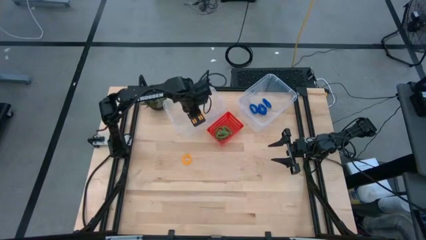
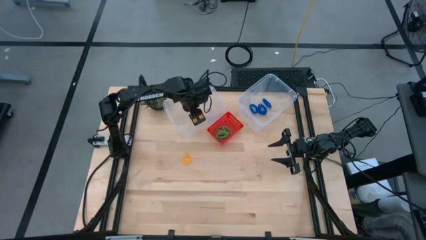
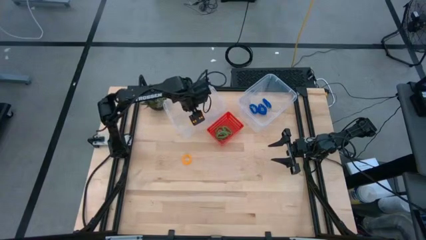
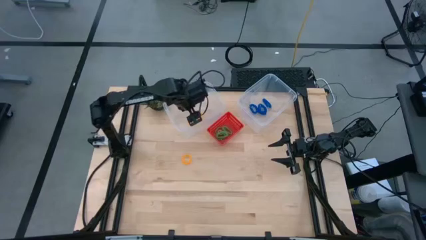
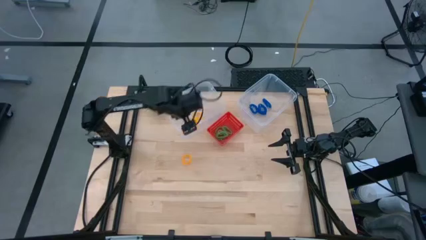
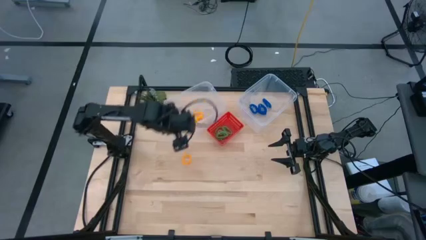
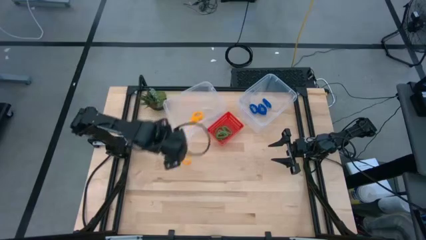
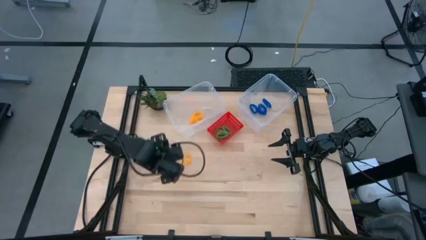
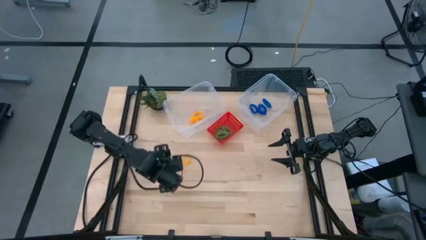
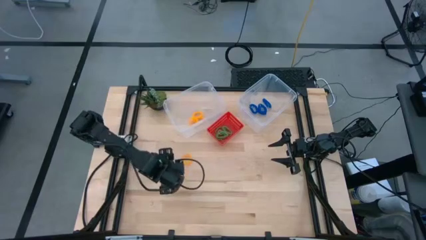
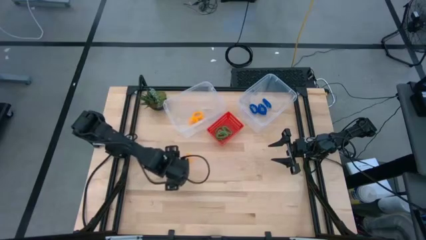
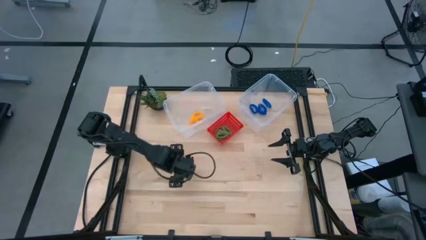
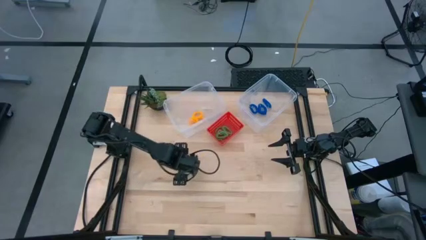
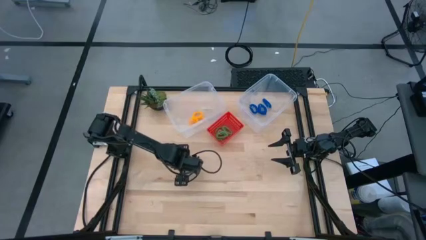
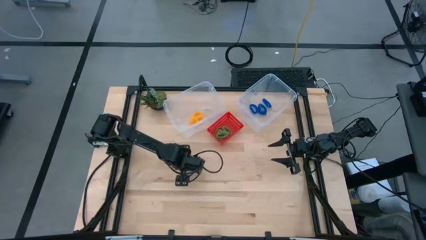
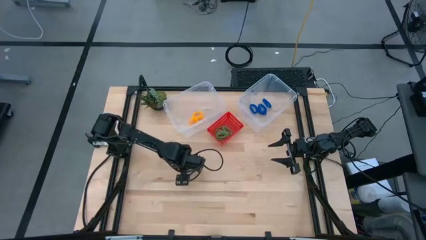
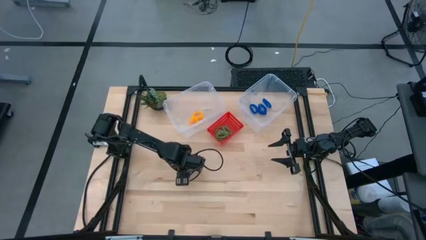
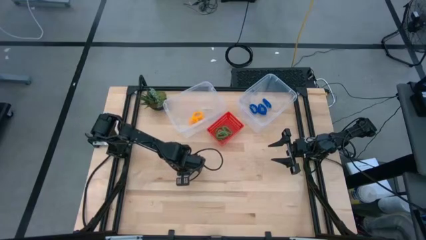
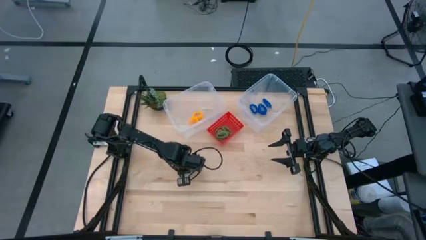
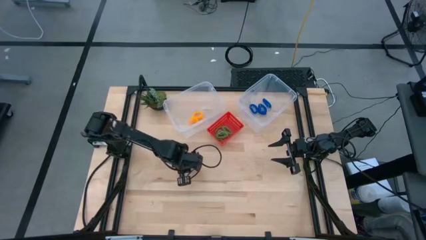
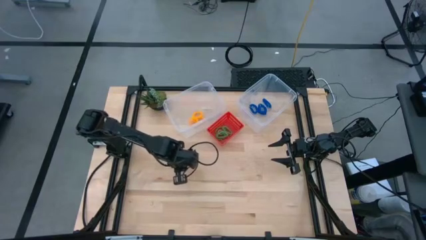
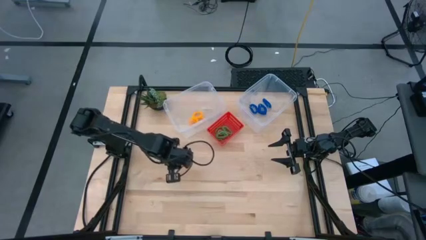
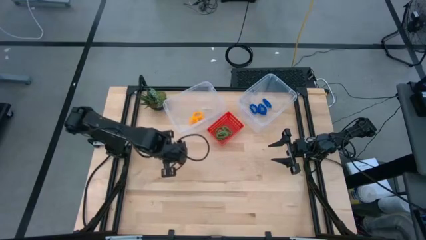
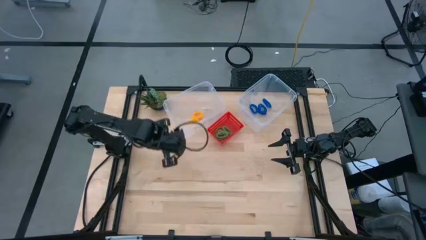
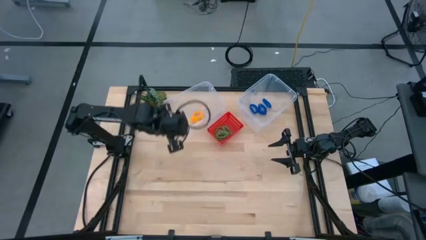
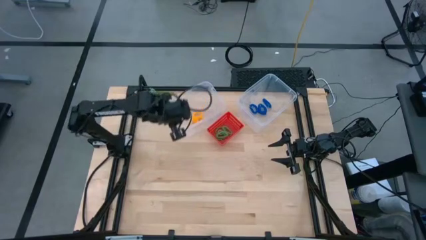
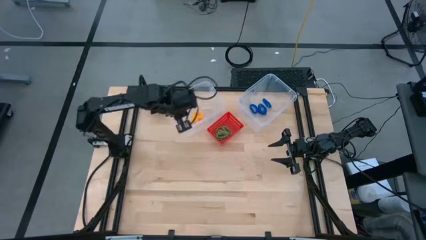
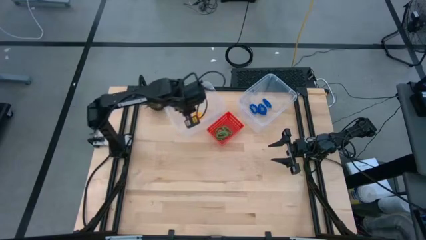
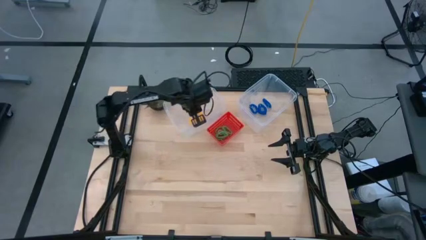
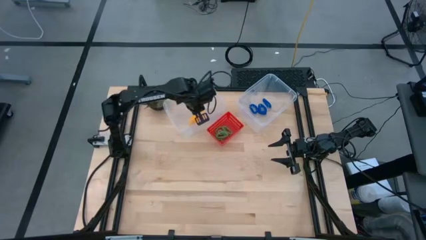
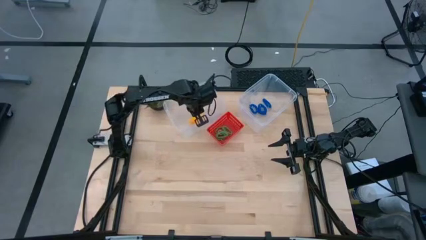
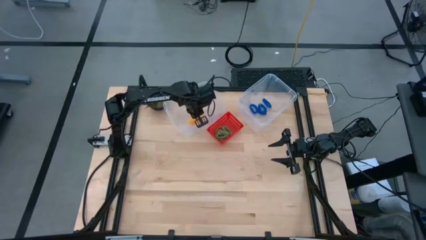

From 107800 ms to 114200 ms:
Task: Sort spring keychains
Put the yellow spring keychain into the left transparent bin

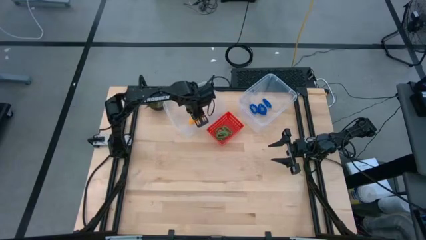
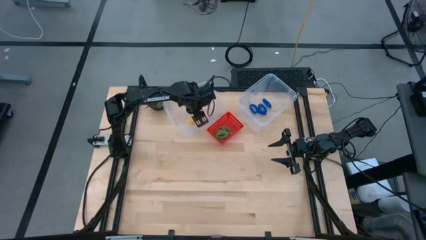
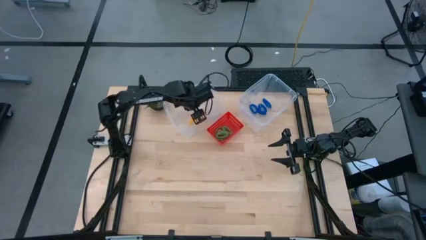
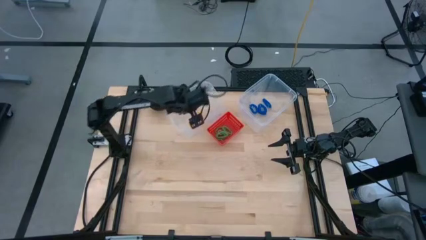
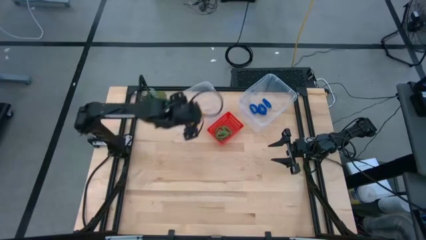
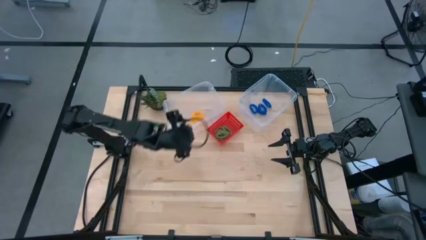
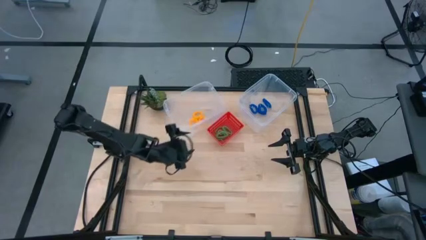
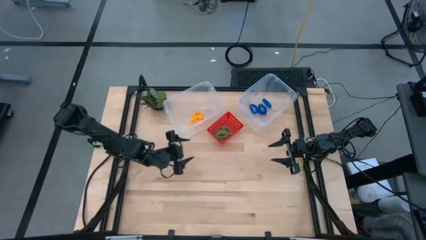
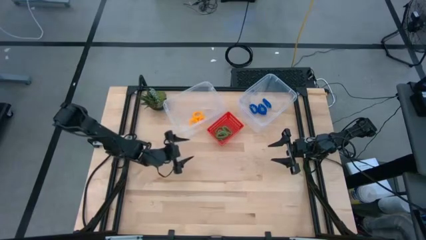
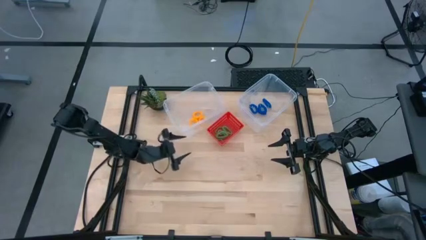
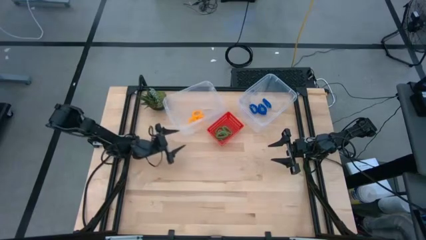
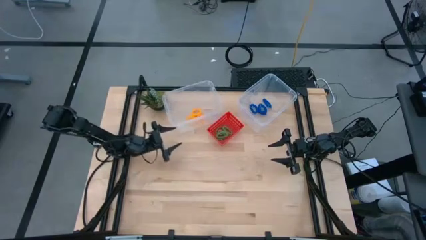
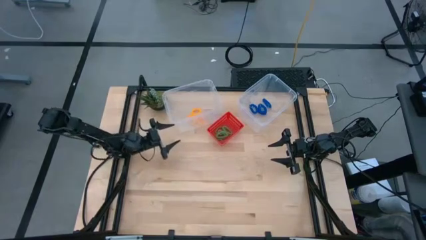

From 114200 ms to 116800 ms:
Adjust the left transparent bin

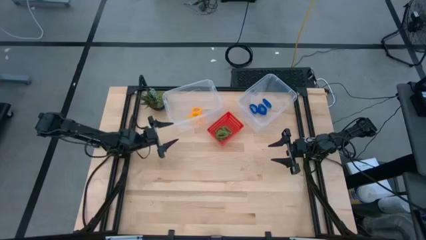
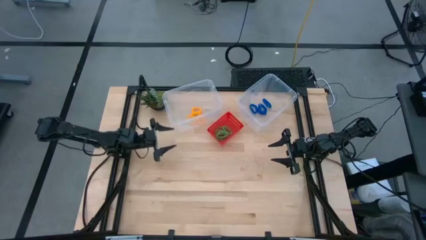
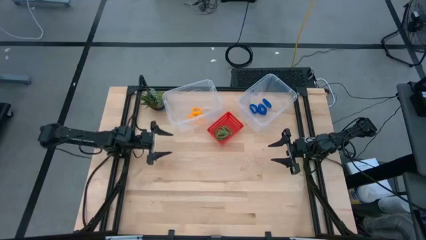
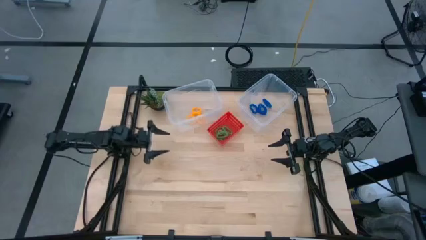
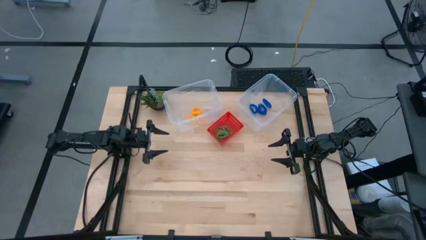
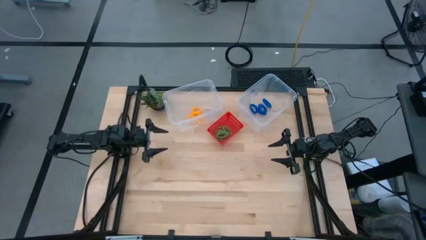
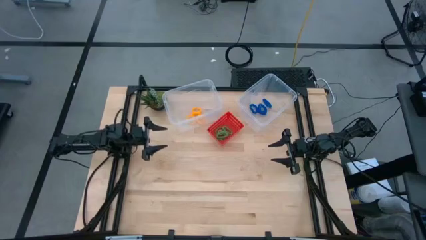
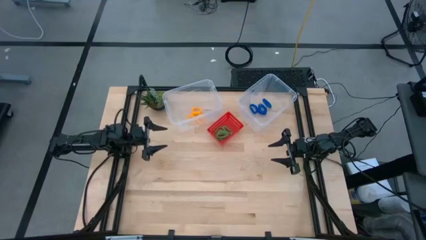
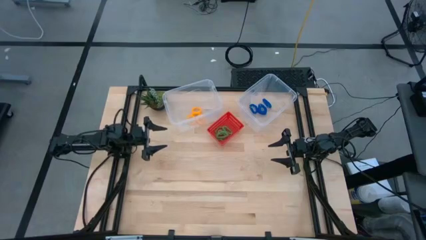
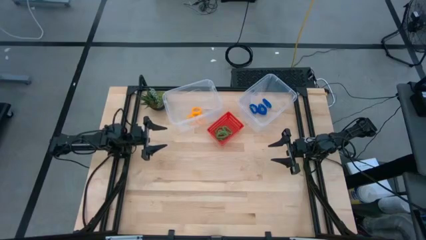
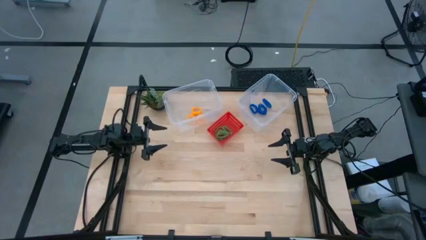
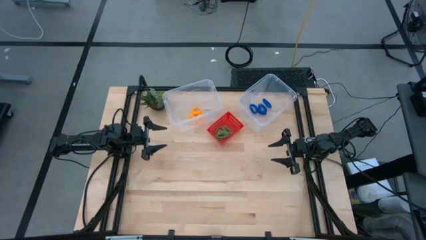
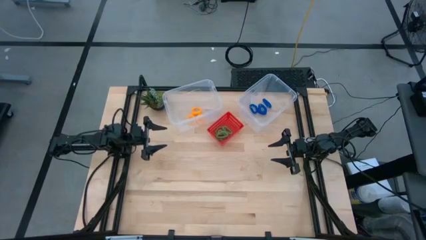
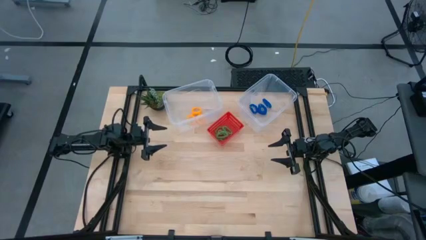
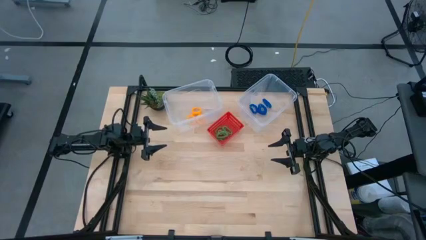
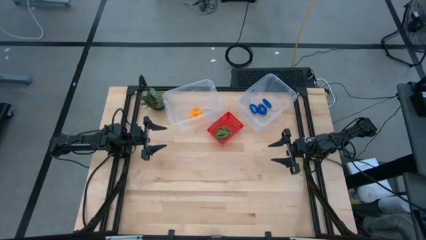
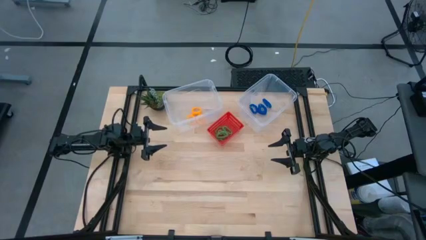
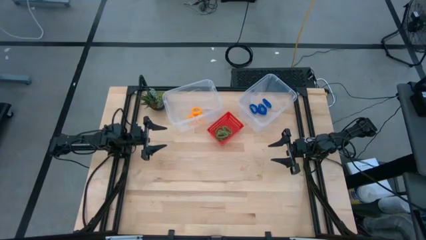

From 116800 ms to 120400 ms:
Return to Home Position

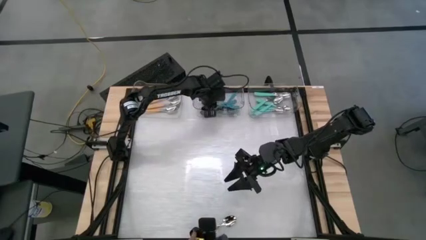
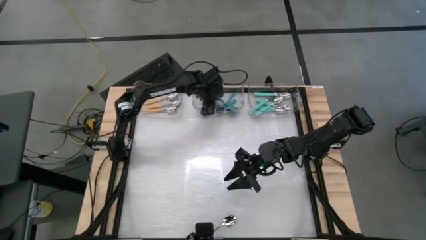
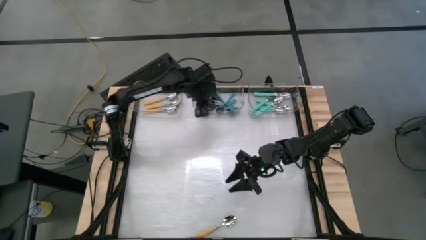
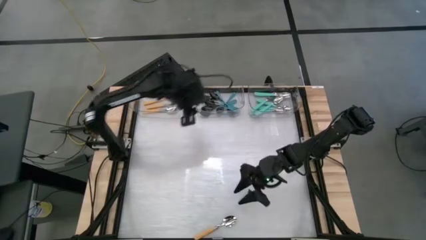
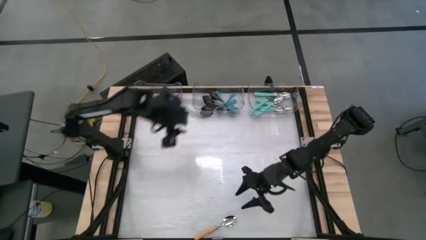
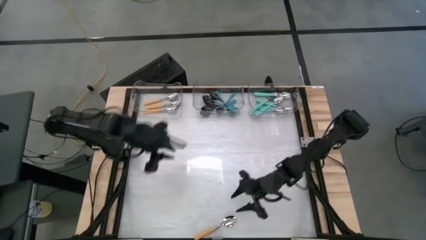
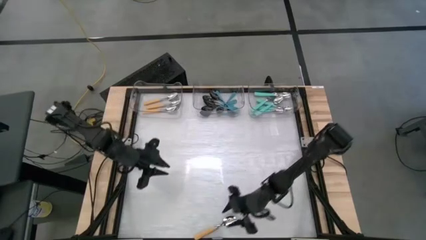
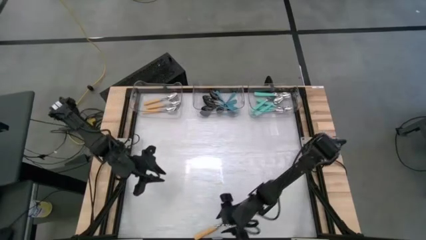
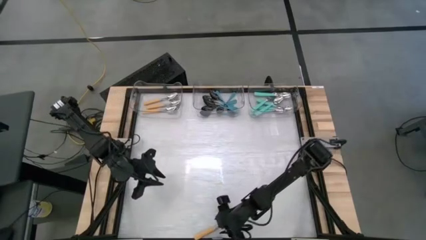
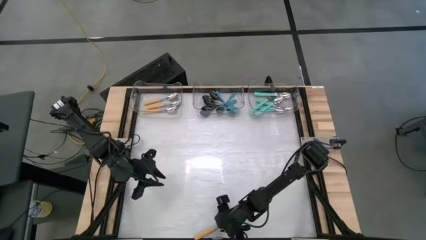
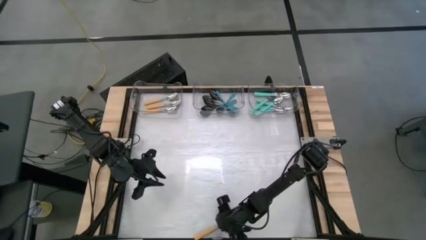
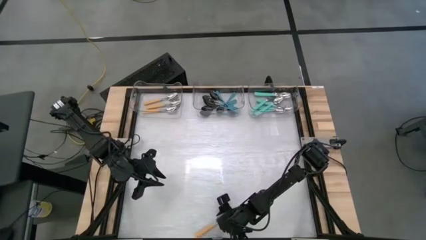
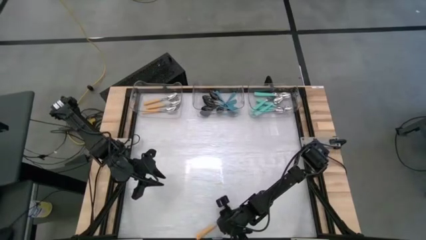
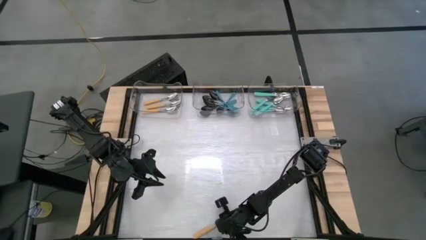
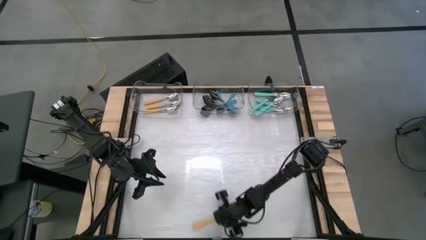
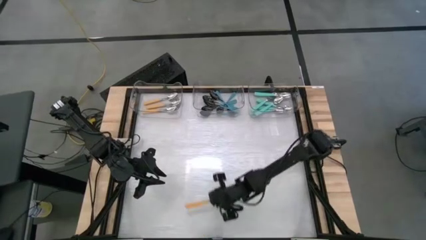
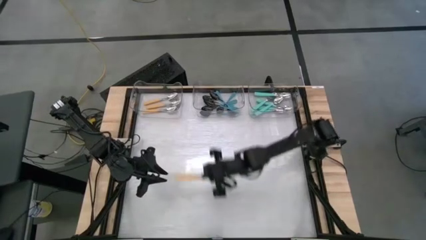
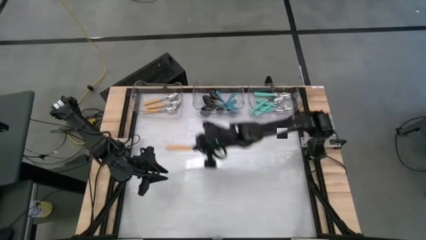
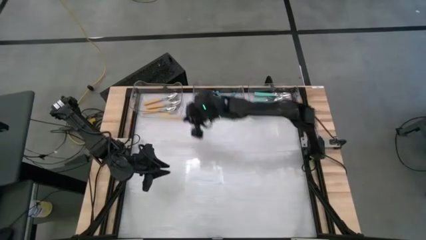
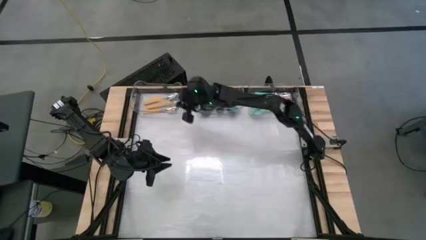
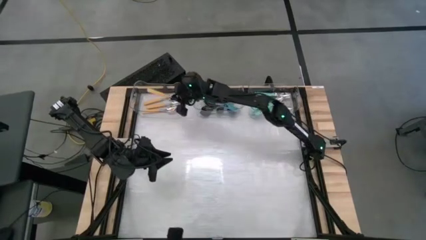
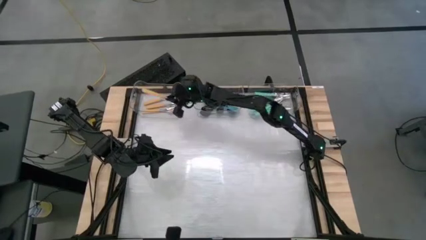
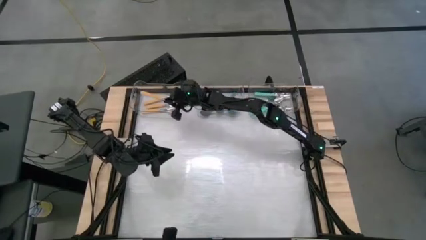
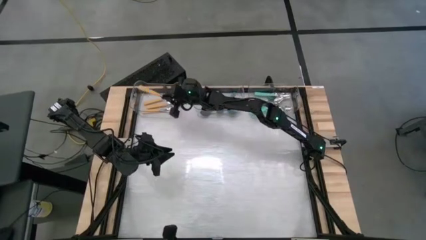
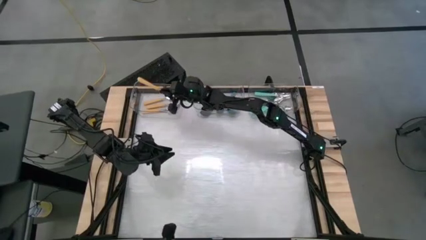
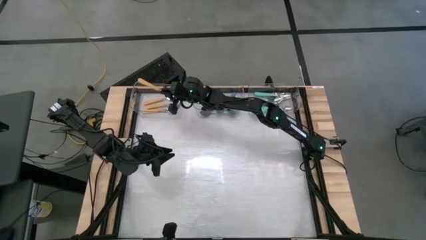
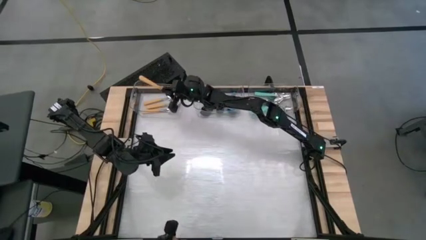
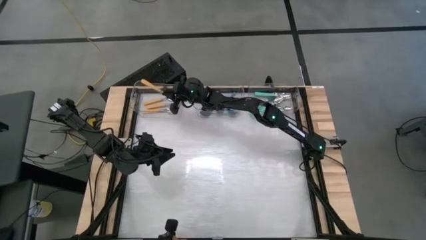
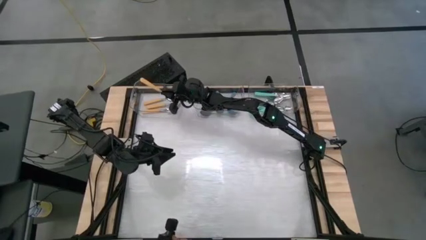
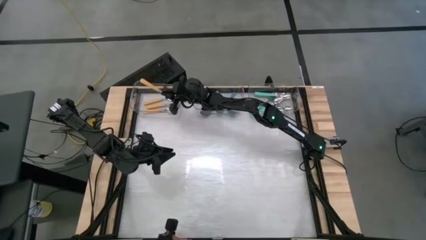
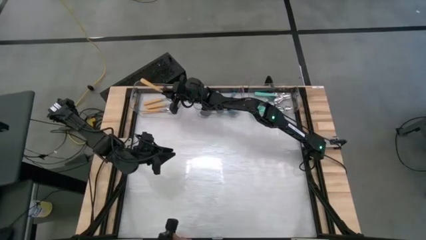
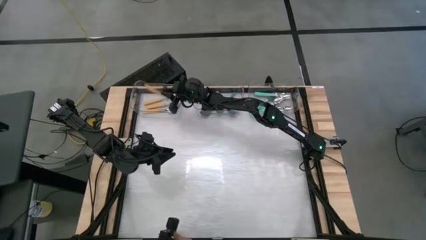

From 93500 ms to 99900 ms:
Task: Sort silverware by color (type)
Put the yellow spoon into the left transparent bin
